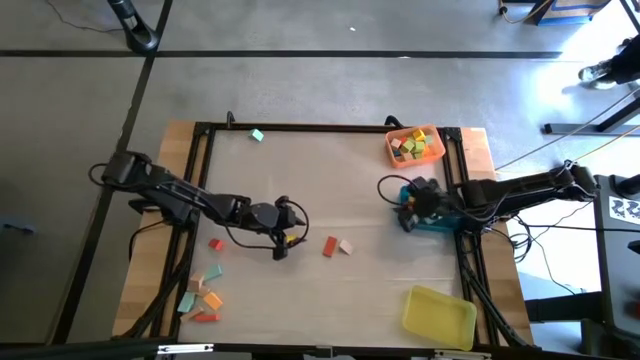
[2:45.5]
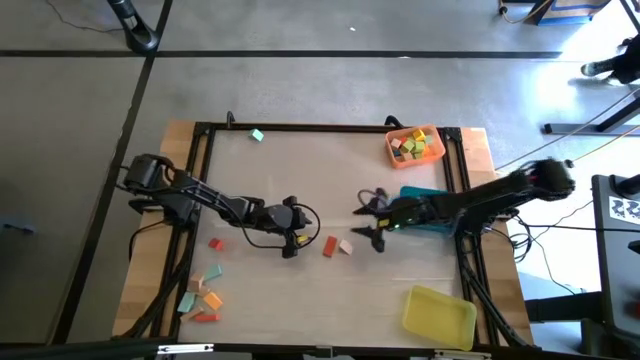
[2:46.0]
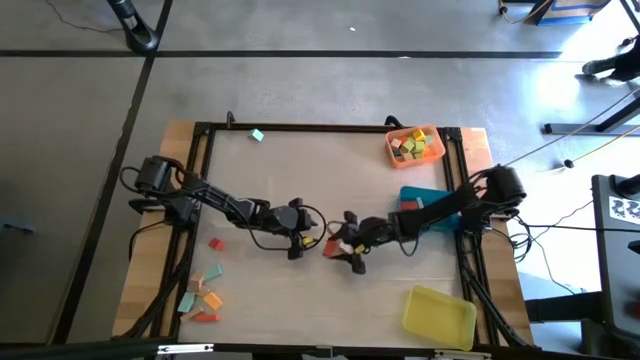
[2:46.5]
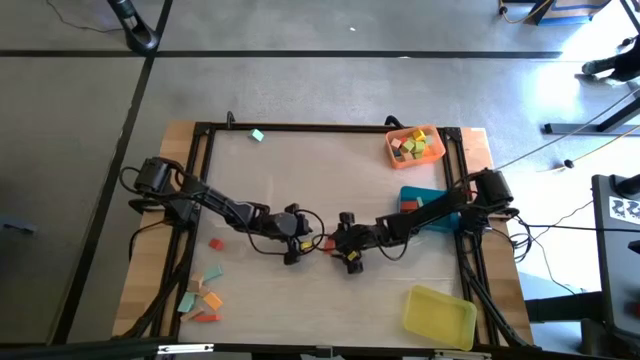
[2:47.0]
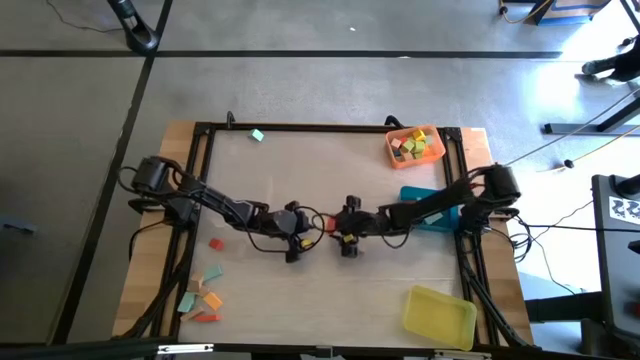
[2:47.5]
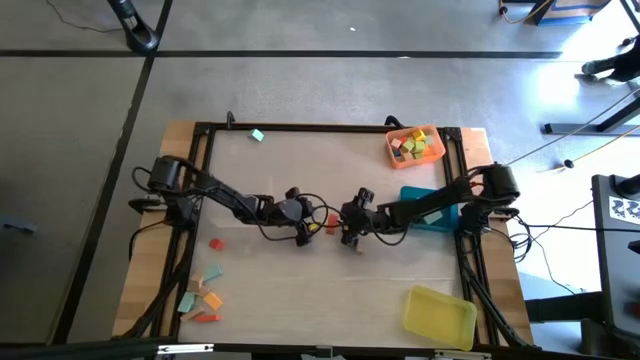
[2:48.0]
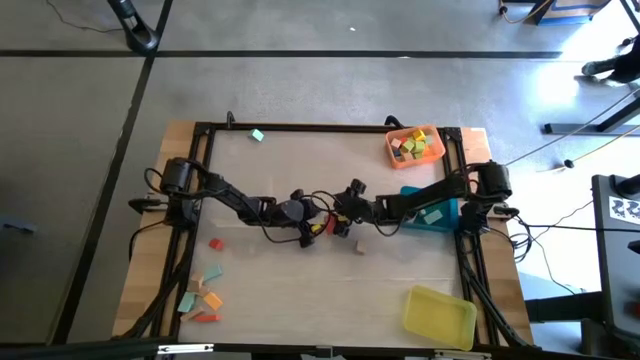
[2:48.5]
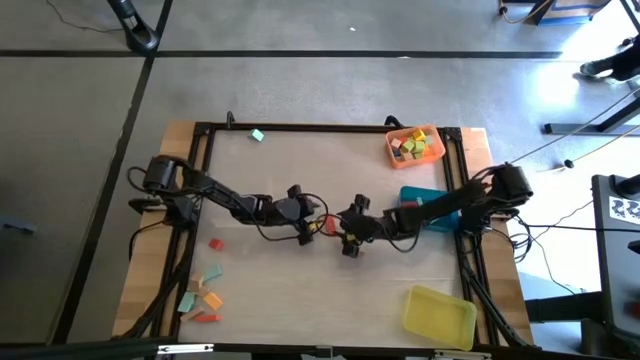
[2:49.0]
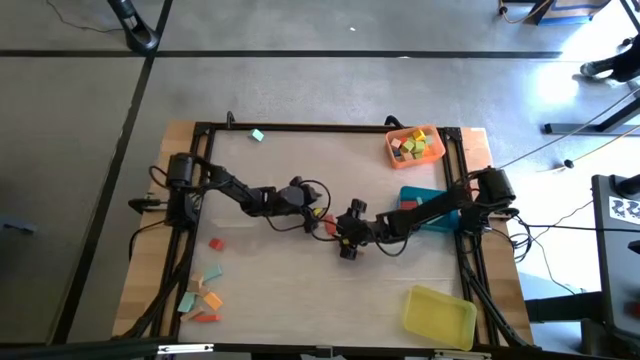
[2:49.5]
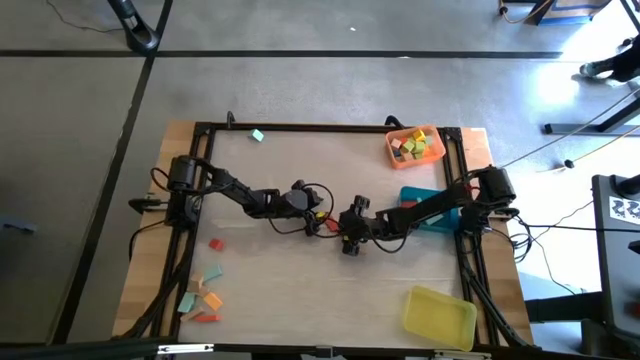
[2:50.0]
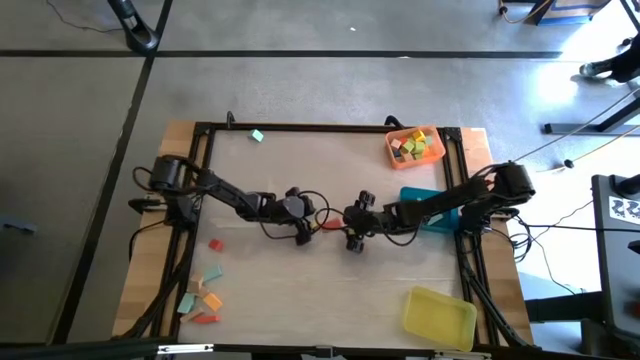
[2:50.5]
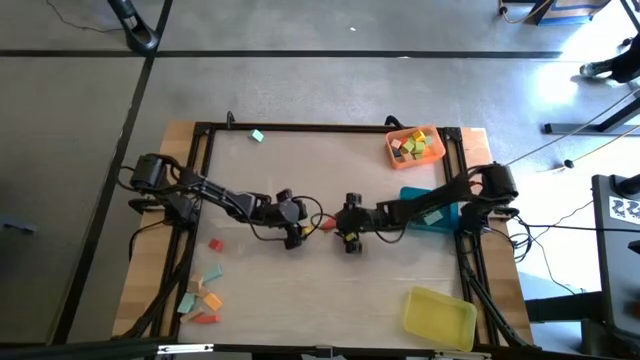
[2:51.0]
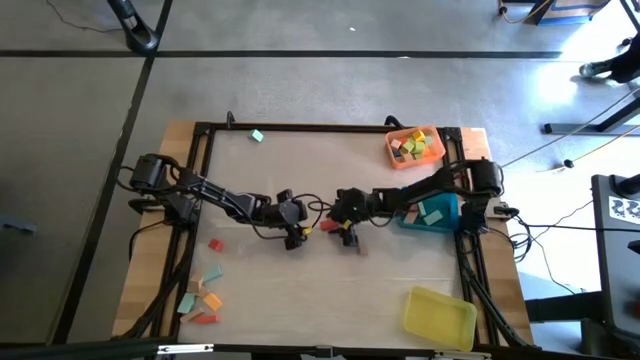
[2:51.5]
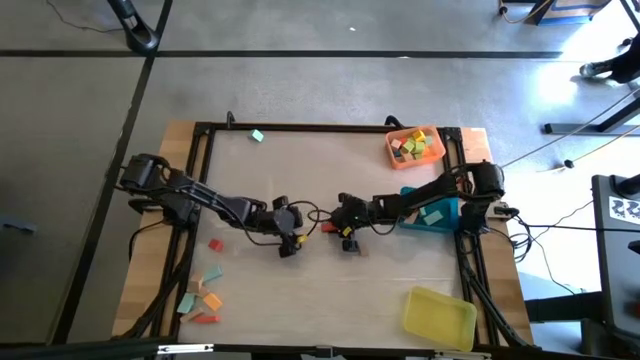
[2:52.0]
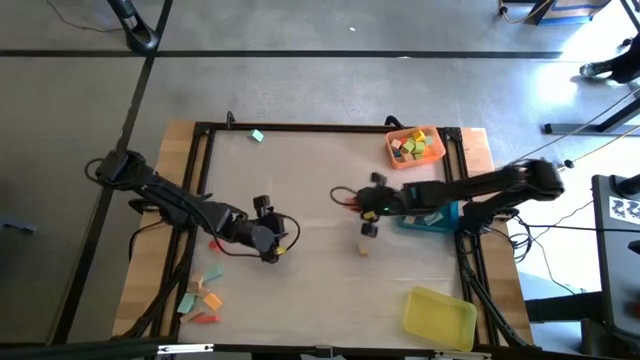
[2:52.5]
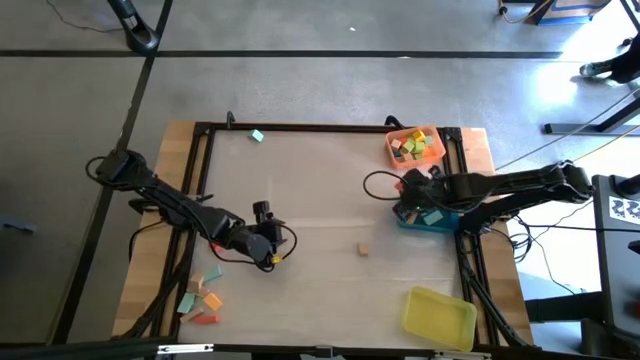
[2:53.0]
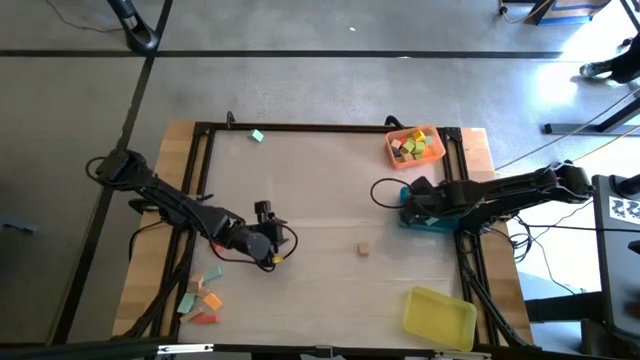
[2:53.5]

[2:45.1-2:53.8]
Task: Sort blocks by size
Put the orange rectangular block into the blue bin

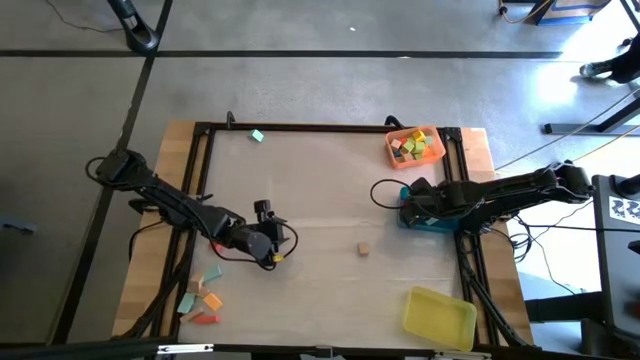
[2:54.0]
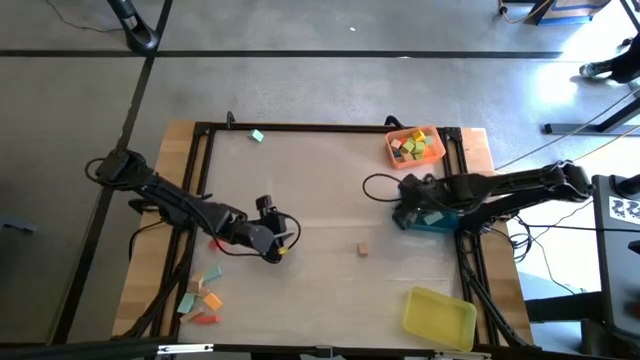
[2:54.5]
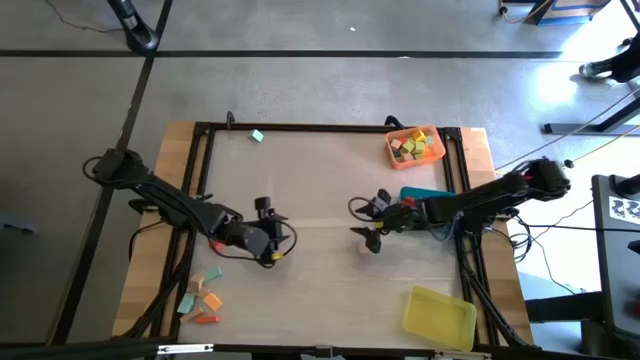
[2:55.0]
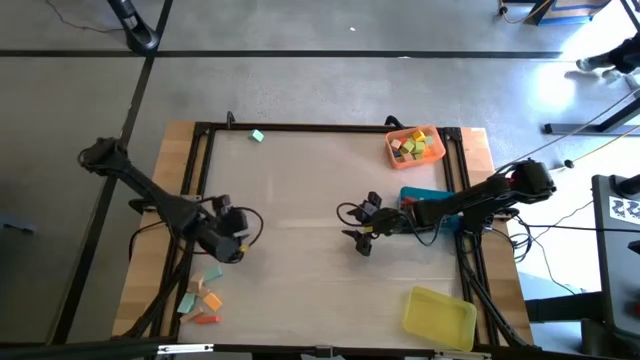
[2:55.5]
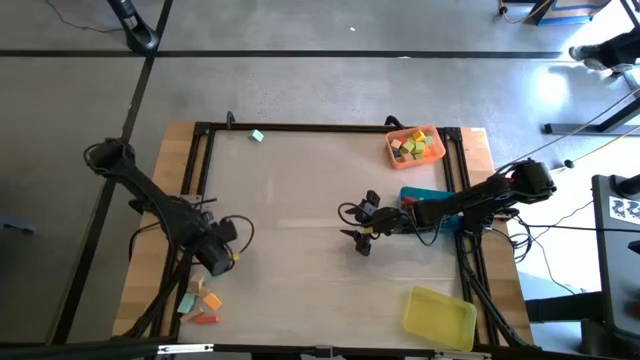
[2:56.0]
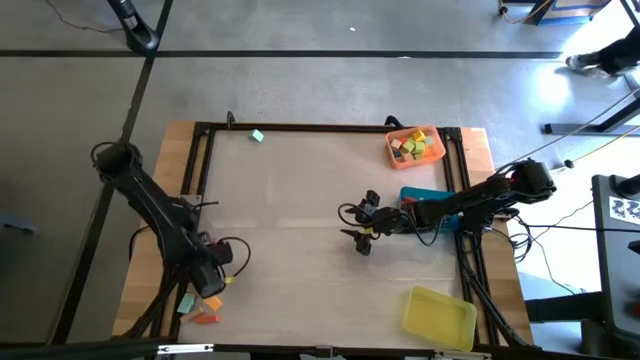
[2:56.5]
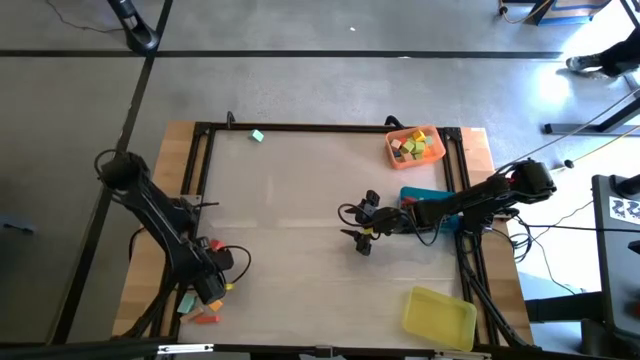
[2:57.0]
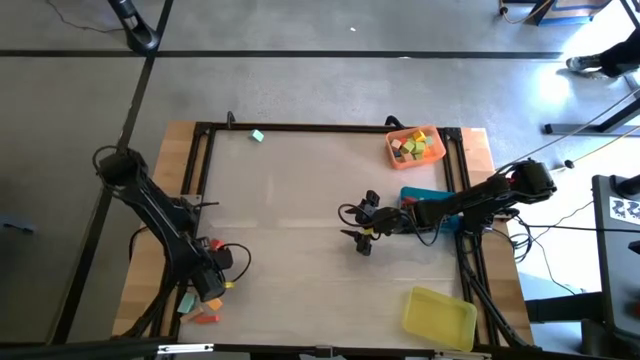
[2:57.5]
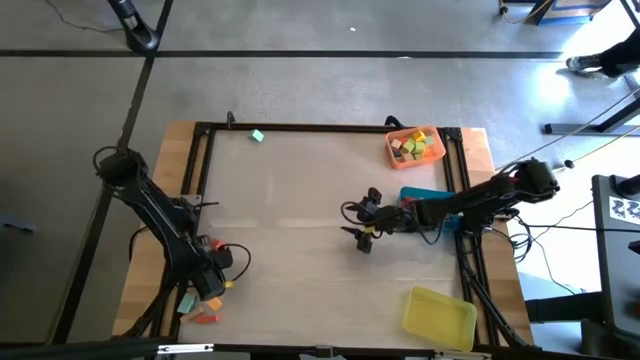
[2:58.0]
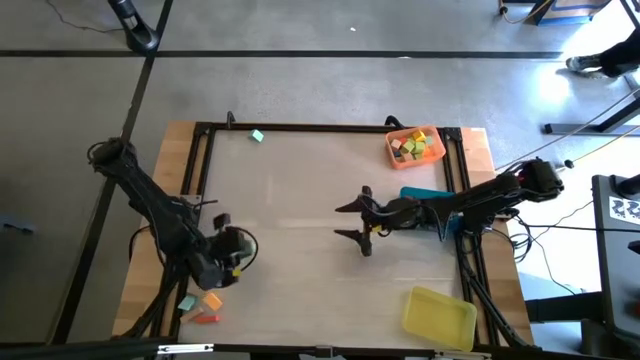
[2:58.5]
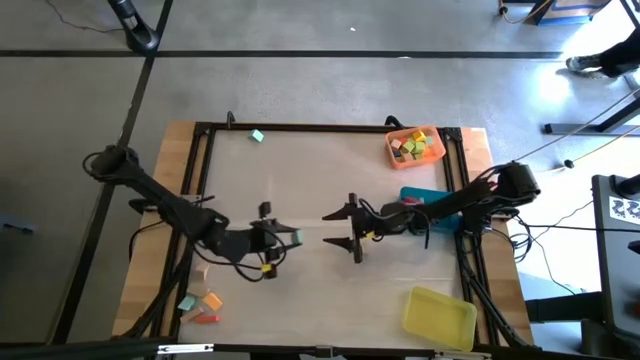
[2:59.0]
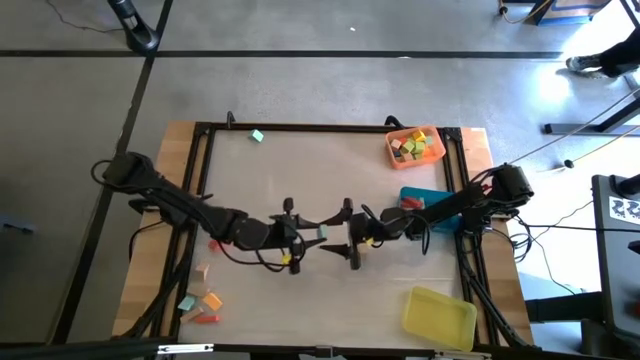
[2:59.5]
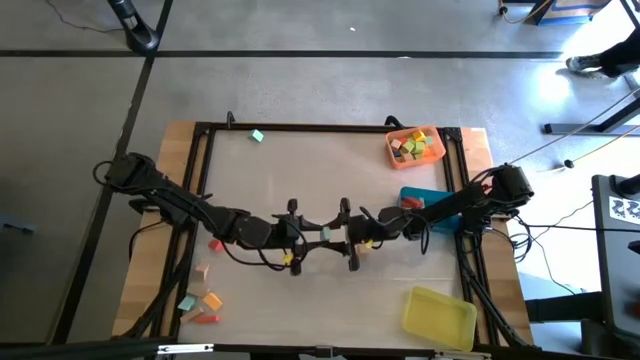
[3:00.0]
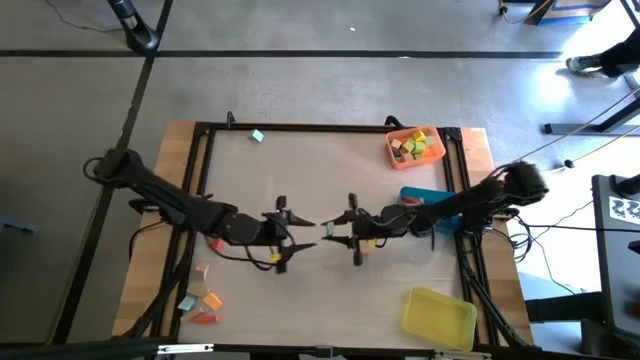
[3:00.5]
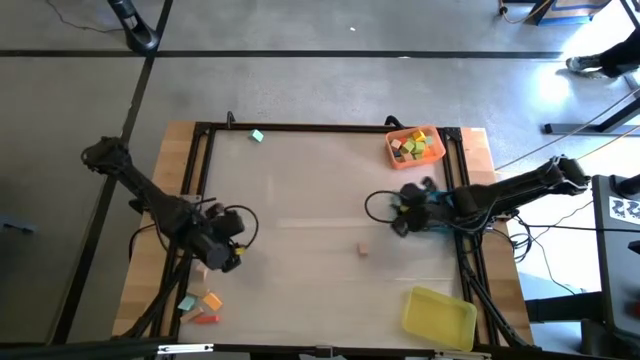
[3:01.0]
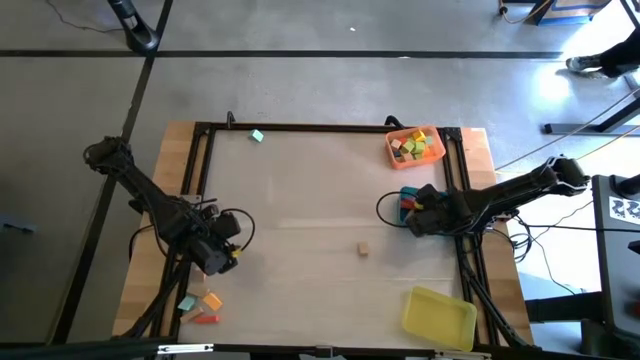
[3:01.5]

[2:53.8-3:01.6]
Put the light blue rectangular block into the blue bin

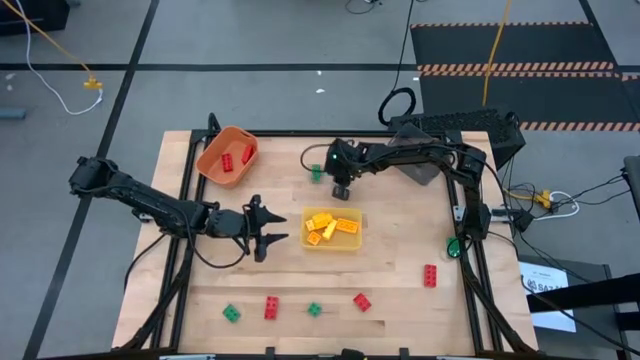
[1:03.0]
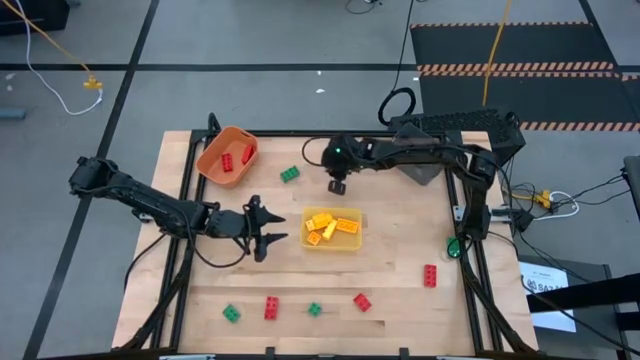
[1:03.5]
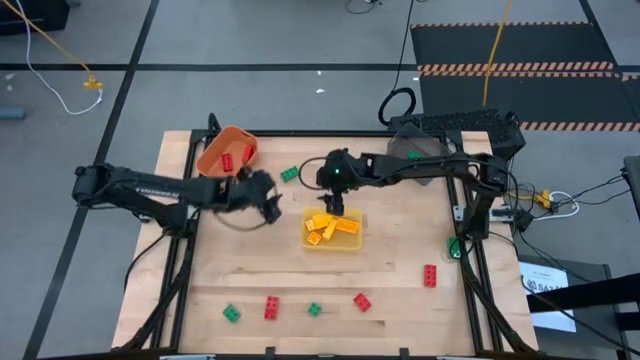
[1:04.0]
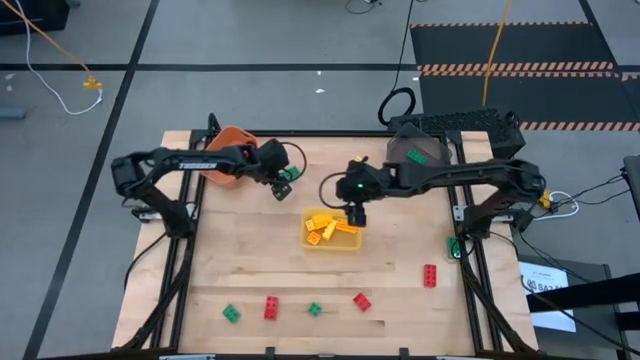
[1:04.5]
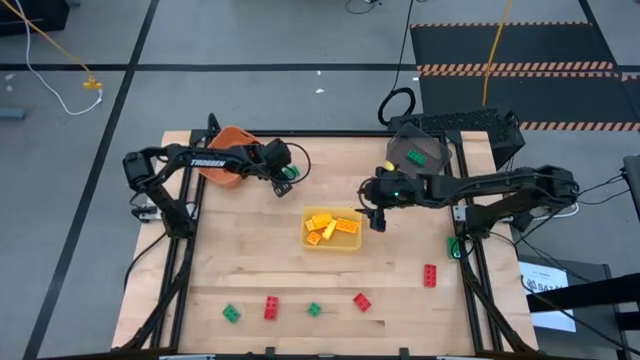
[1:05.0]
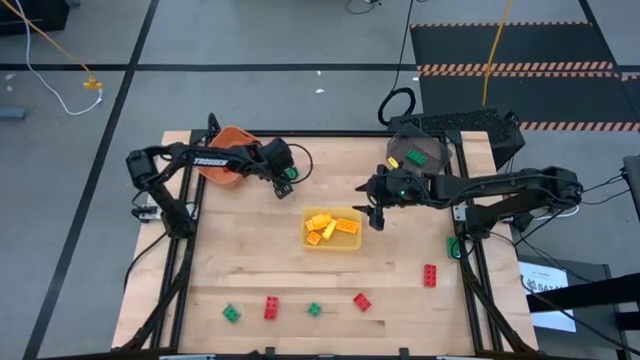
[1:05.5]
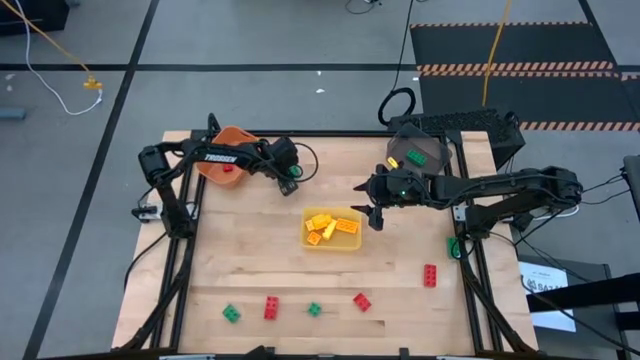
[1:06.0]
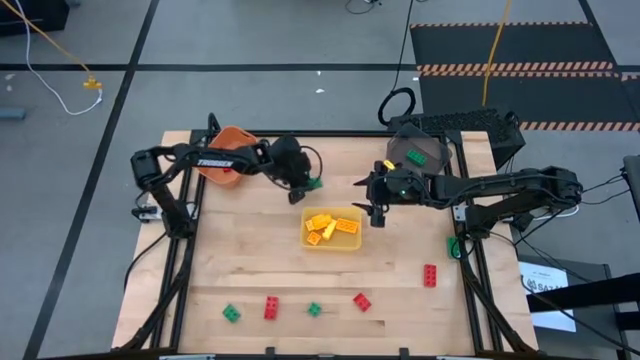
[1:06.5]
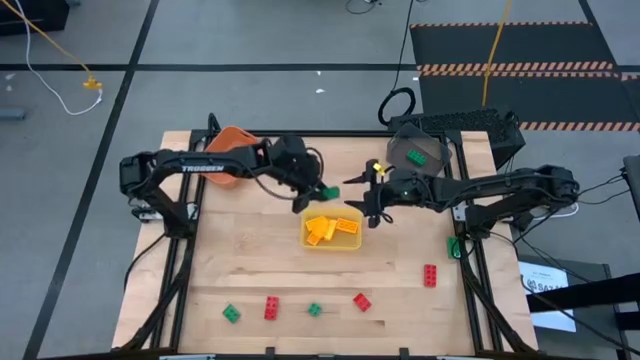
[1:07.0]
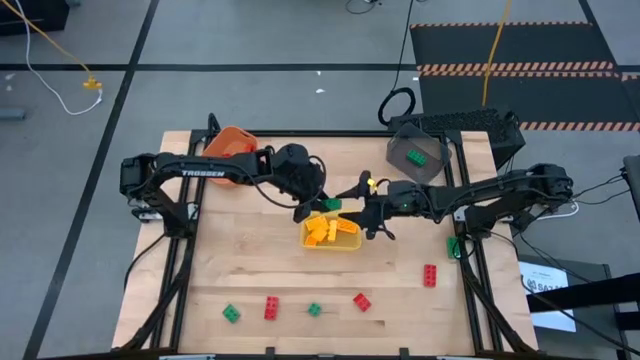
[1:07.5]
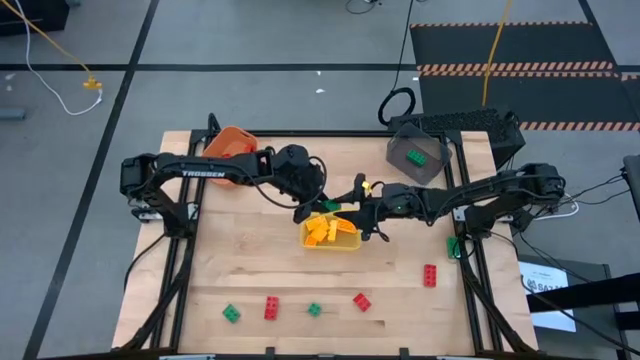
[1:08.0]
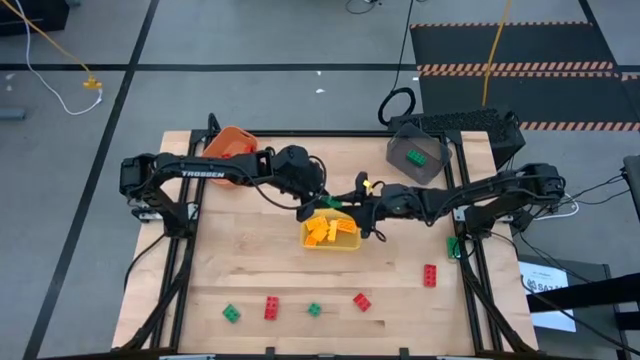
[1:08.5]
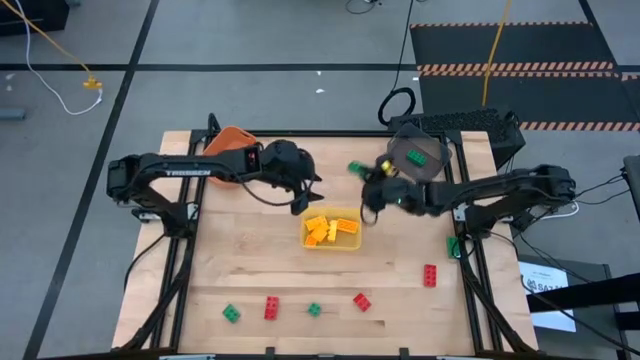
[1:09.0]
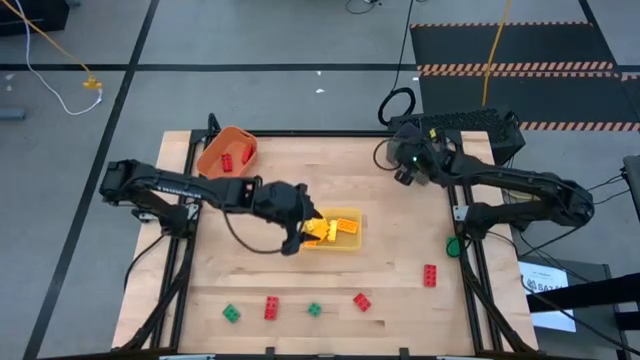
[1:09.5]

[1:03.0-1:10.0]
Task: Sort & place blocks by color
Put the top center green 8-stud game piece into the black bin
